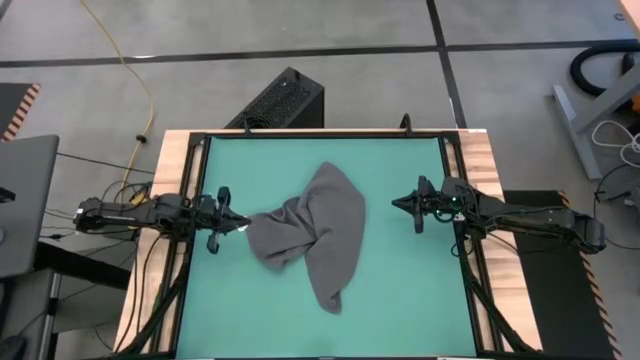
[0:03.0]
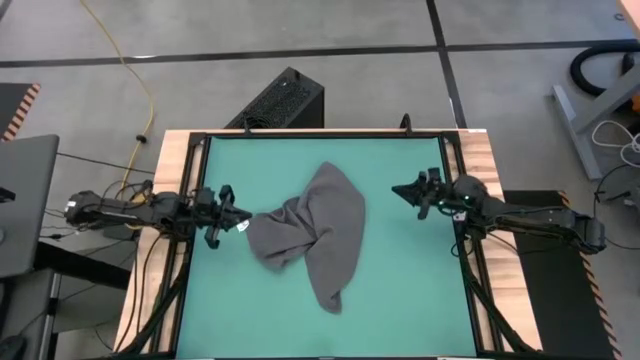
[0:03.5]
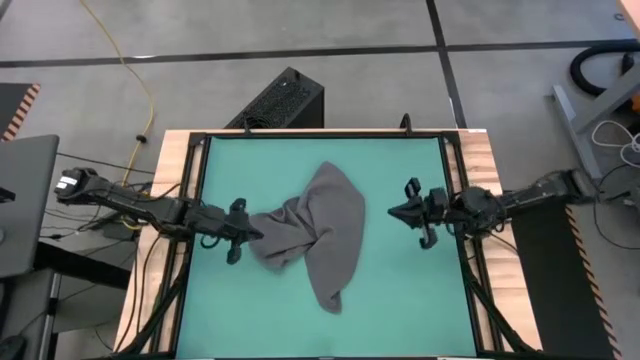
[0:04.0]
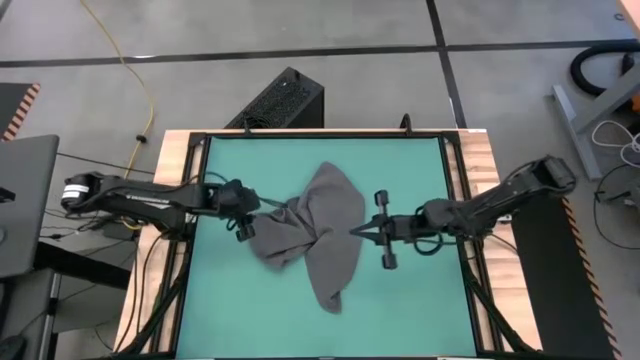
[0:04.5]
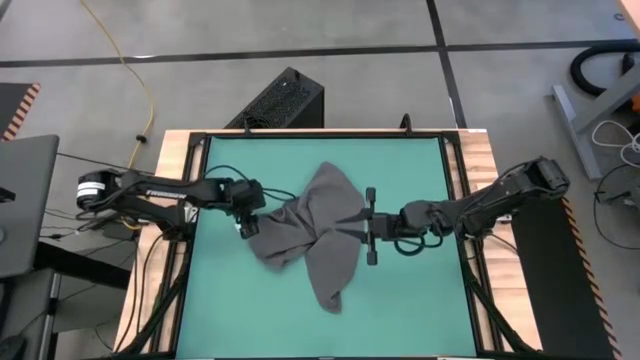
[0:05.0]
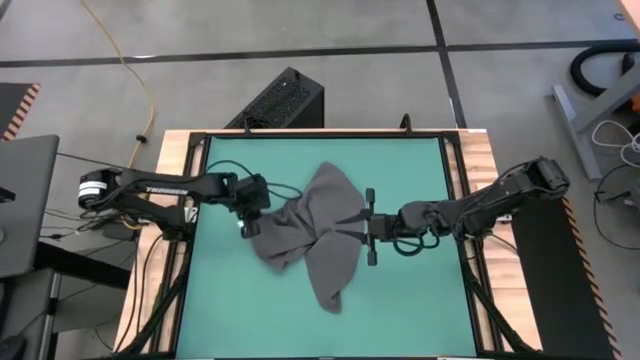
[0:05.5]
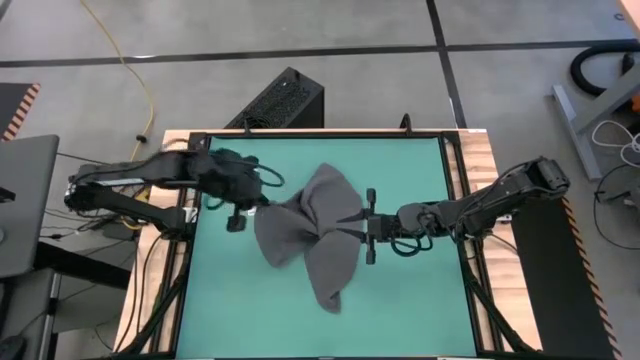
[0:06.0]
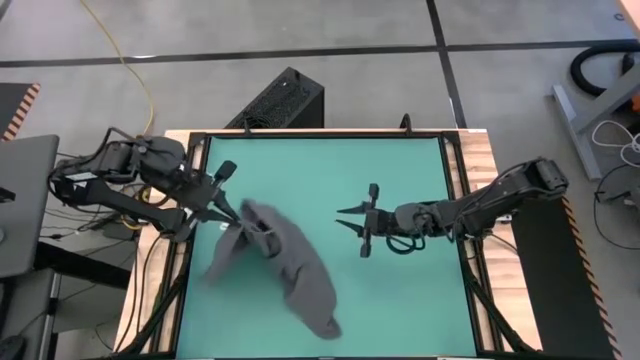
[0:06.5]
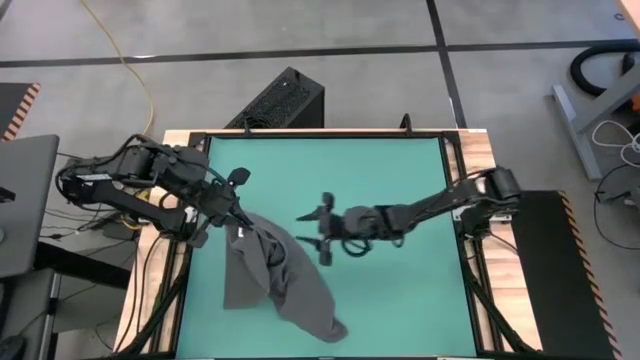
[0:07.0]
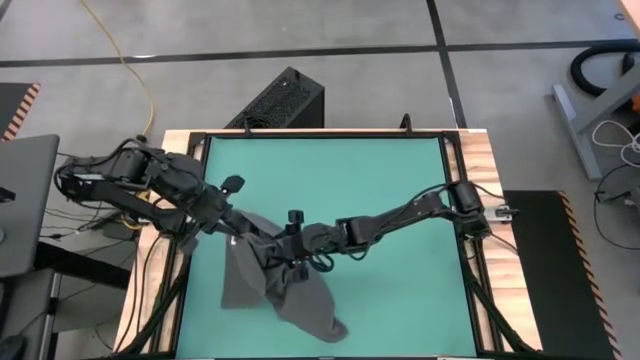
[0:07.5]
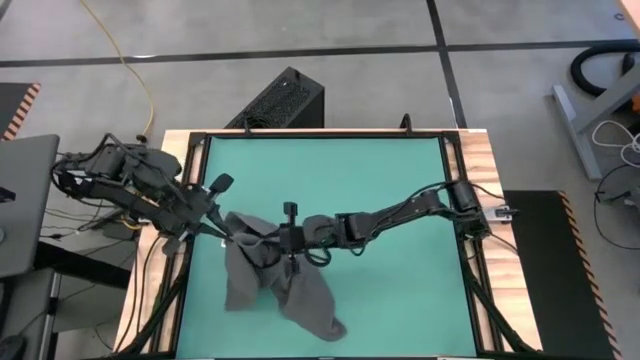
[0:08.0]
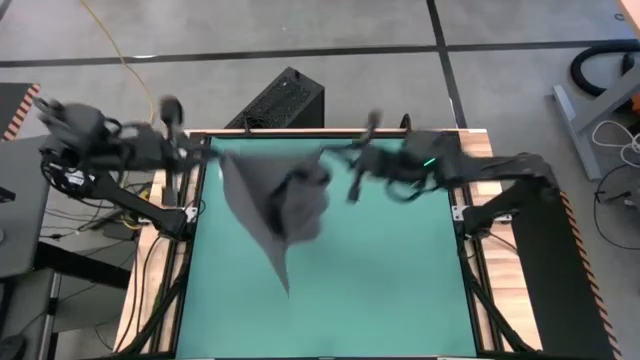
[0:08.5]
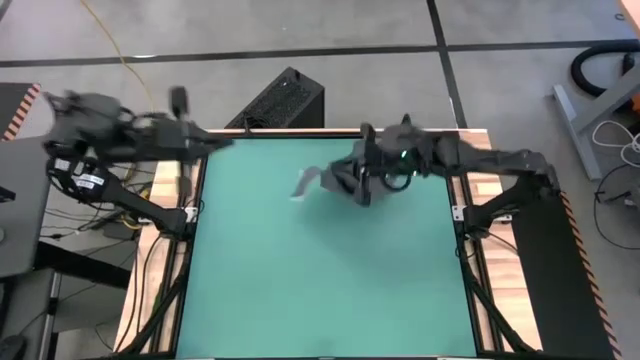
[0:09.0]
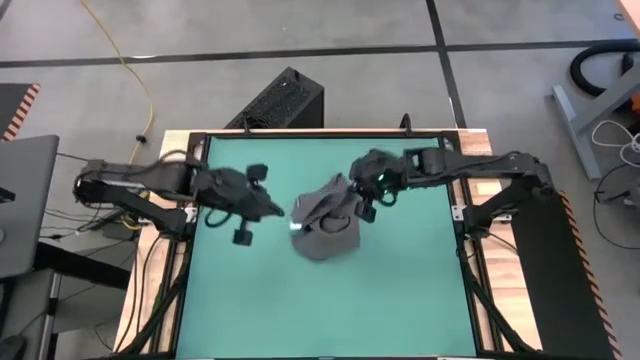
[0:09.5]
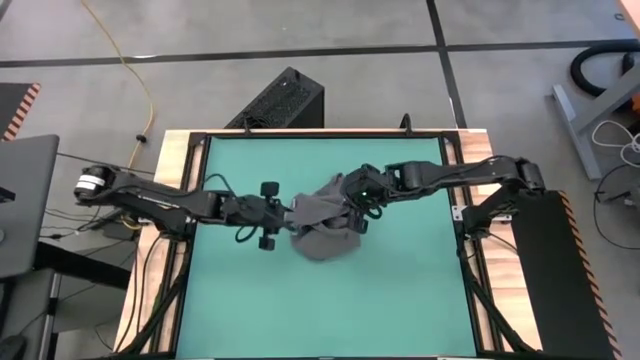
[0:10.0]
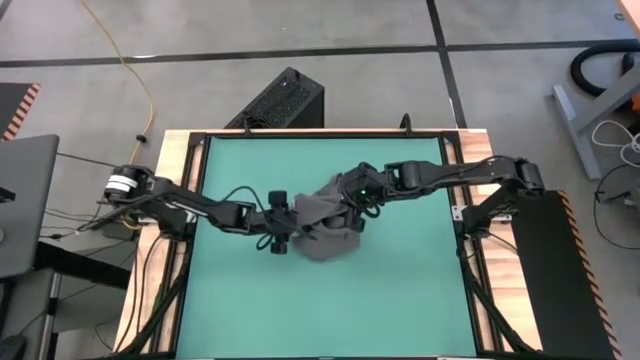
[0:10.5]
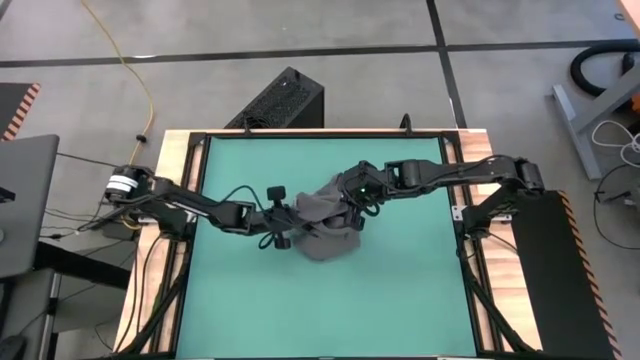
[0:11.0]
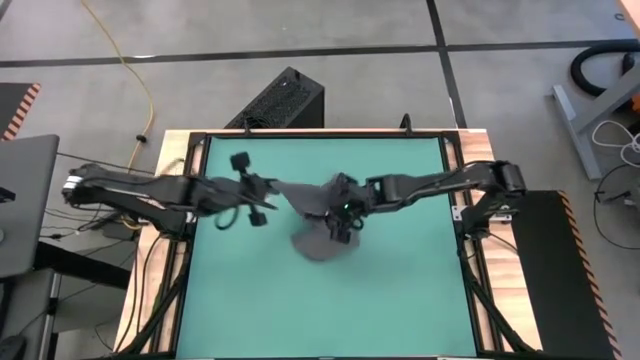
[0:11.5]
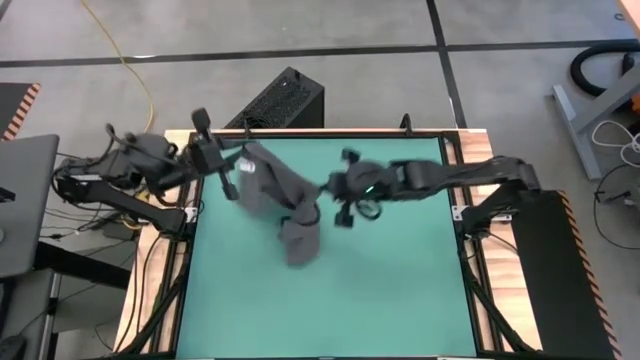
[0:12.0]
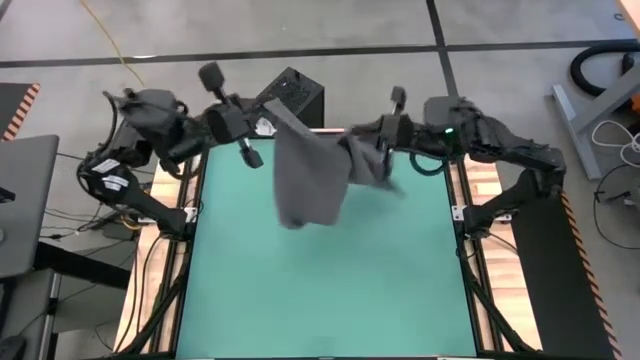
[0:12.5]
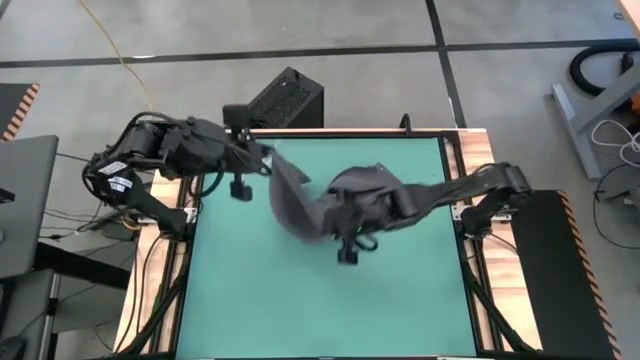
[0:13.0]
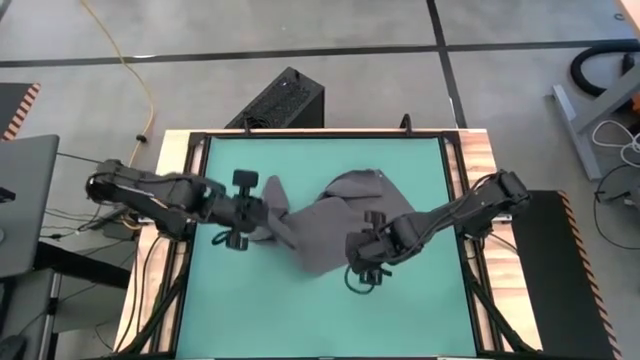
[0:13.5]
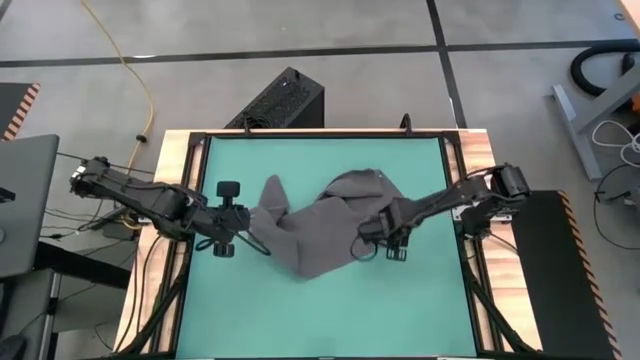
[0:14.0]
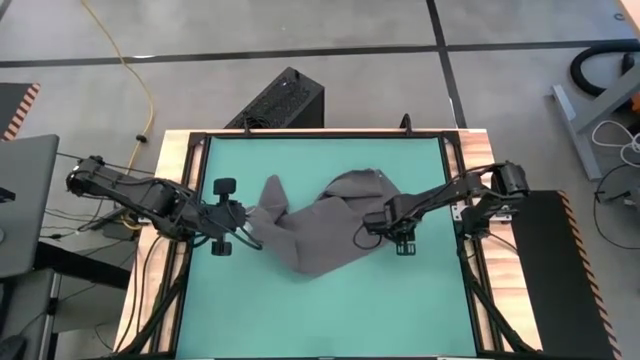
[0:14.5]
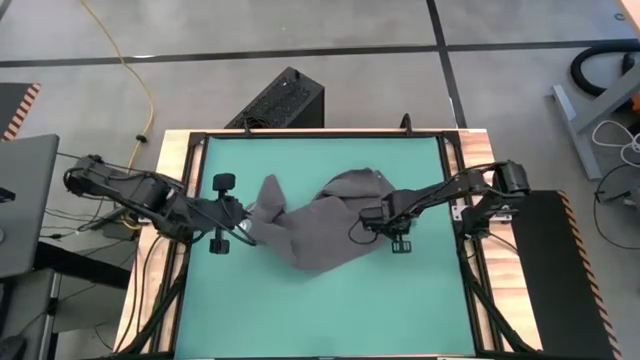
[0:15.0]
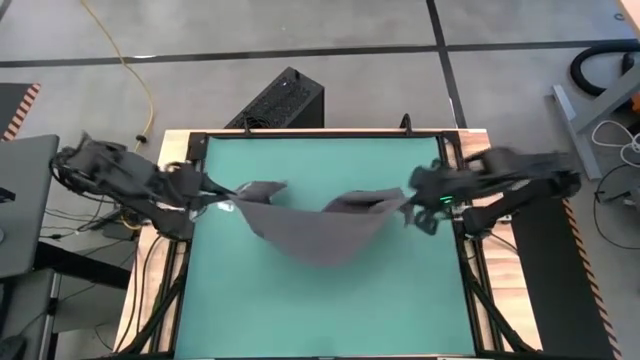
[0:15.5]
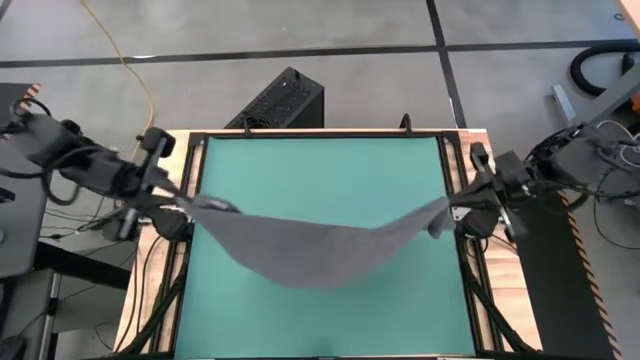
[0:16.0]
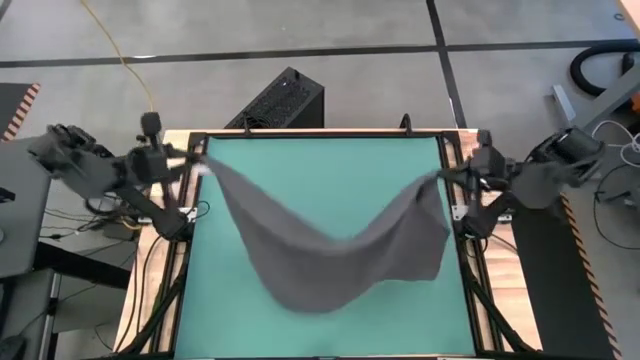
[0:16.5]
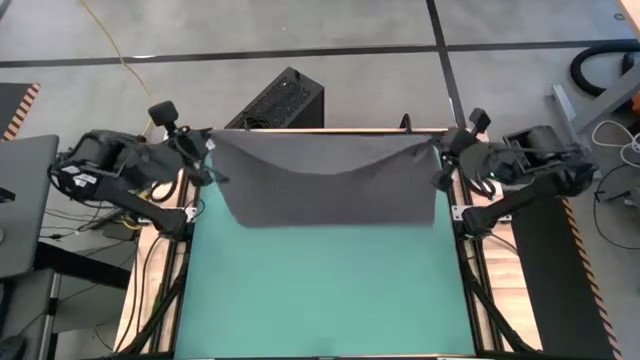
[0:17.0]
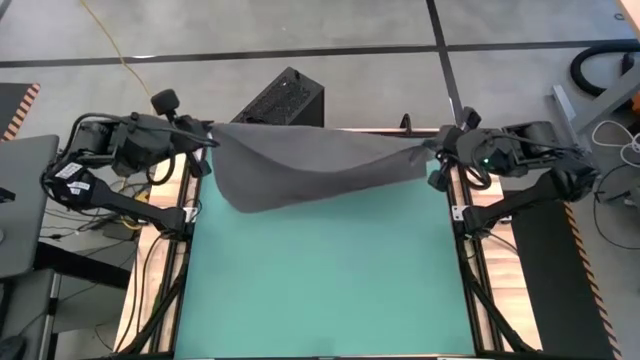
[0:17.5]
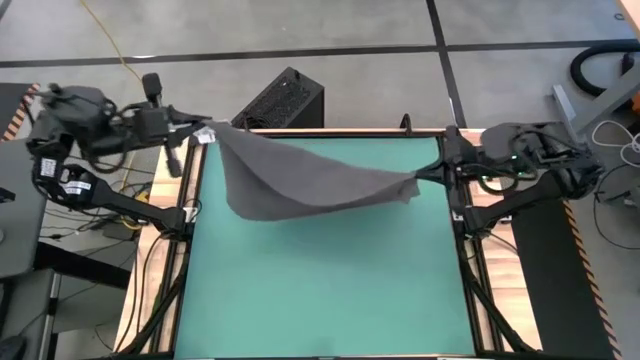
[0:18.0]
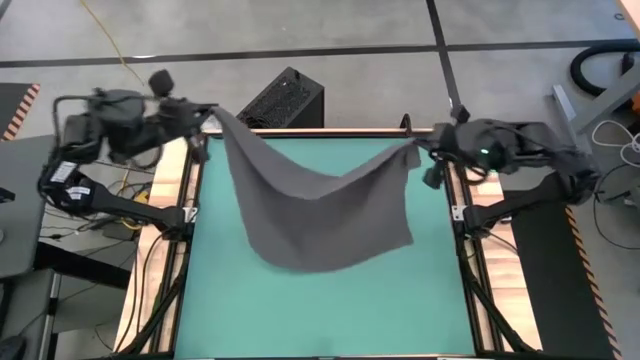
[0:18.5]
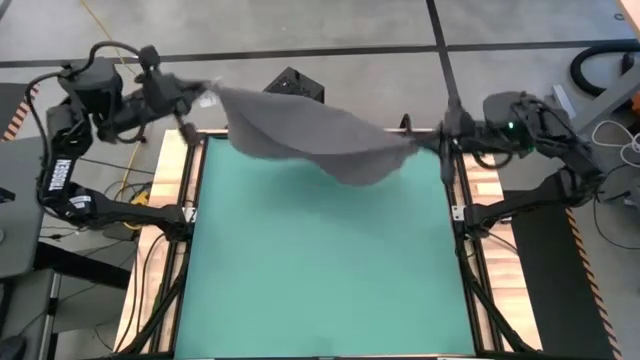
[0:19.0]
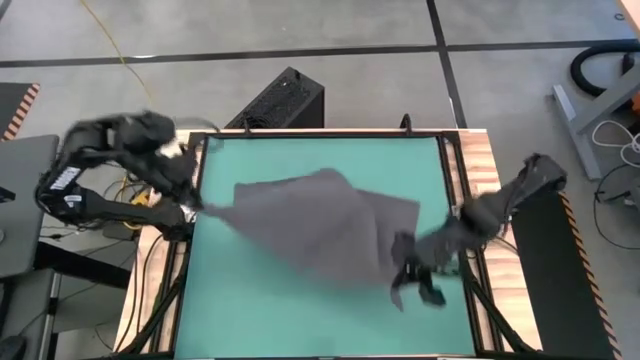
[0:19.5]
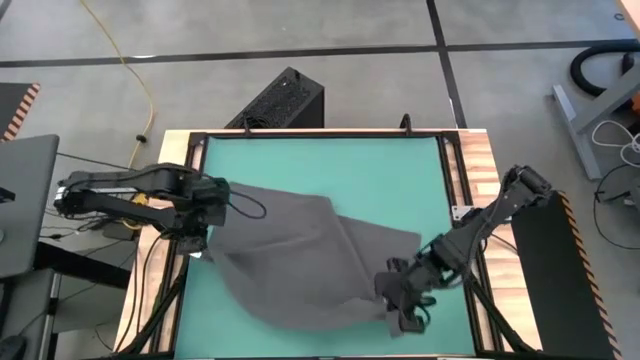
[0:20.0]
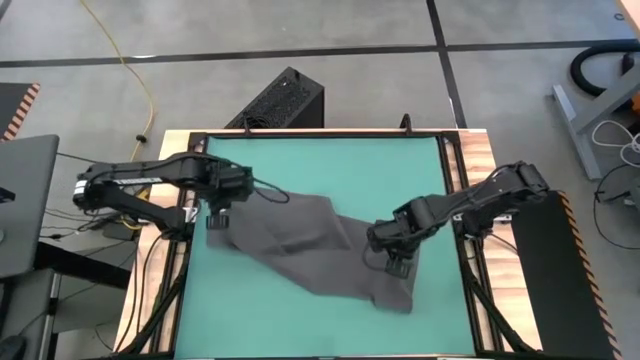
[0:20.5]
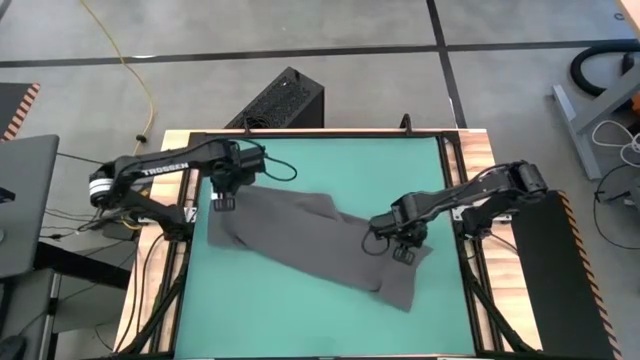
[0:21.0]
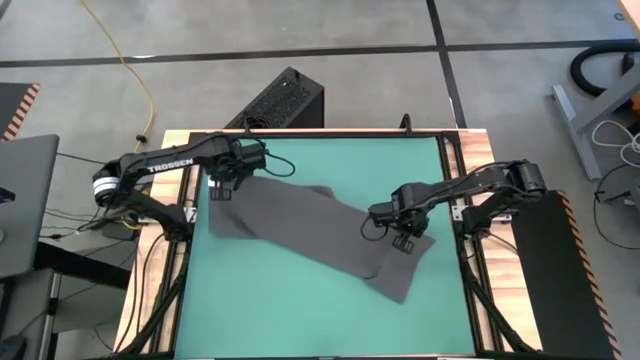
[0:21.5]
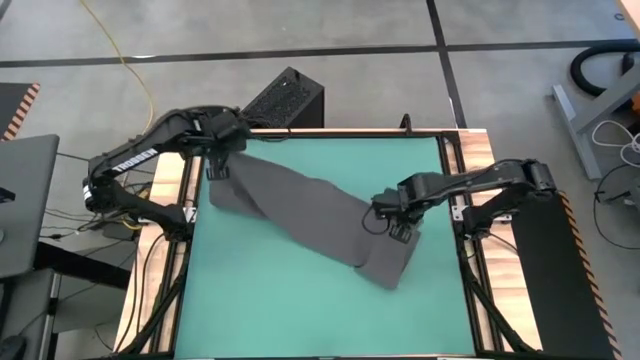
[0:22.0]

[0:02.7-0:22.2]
Task: Roll towel
Roll the gray towel
